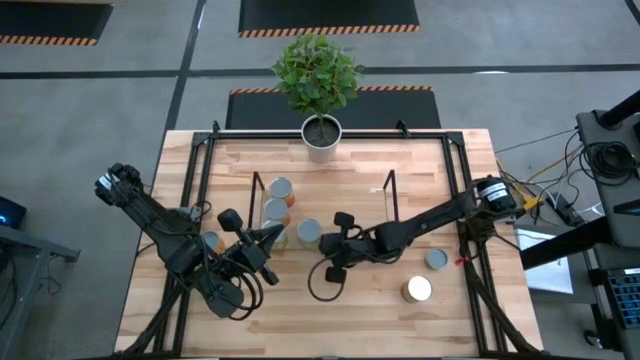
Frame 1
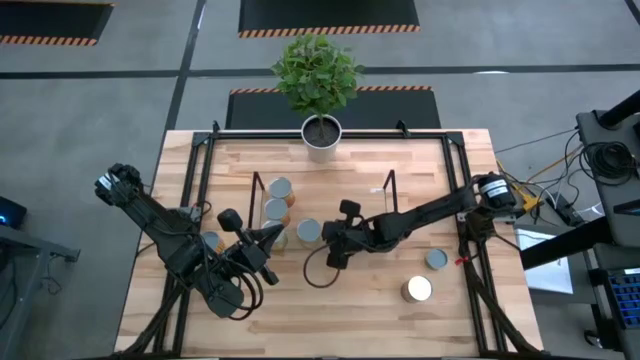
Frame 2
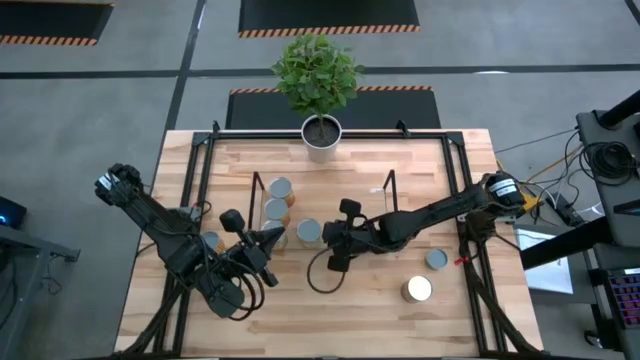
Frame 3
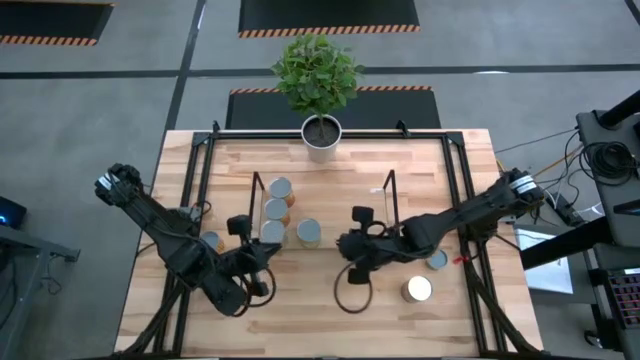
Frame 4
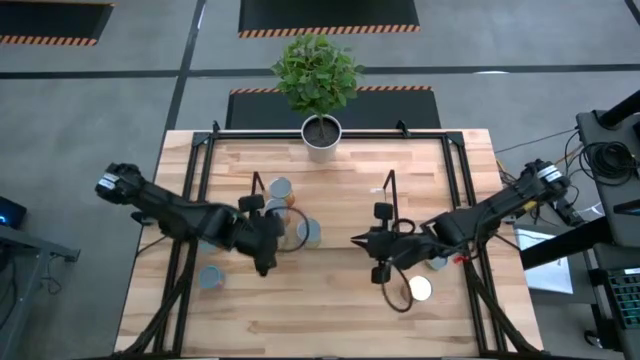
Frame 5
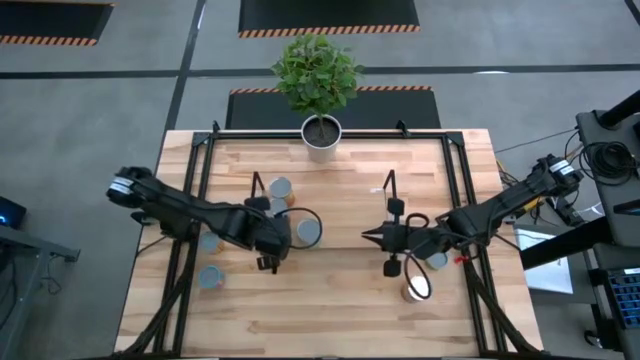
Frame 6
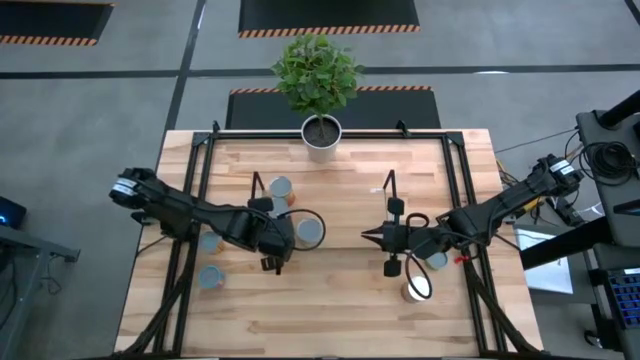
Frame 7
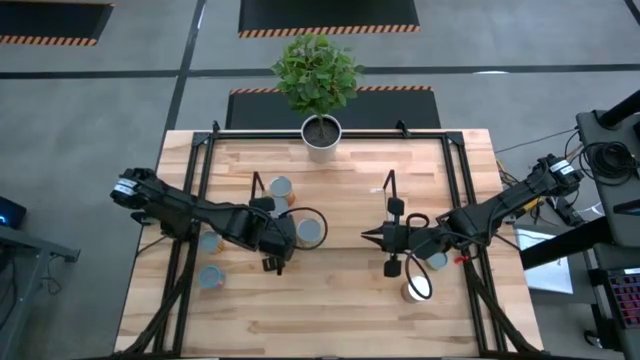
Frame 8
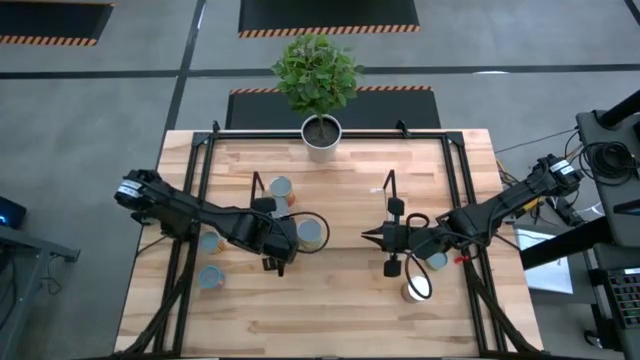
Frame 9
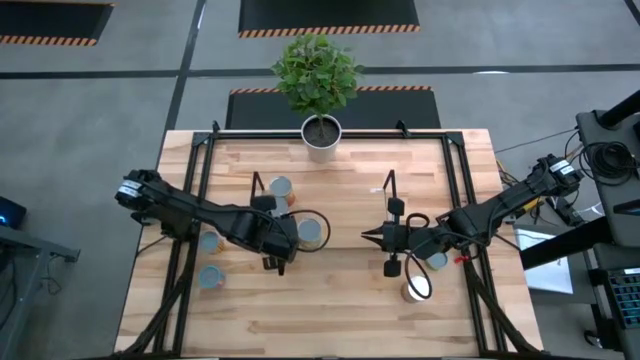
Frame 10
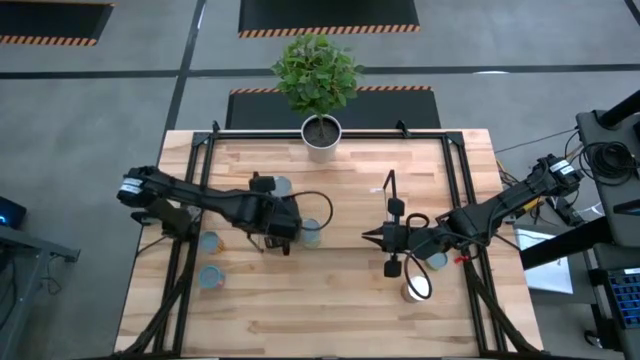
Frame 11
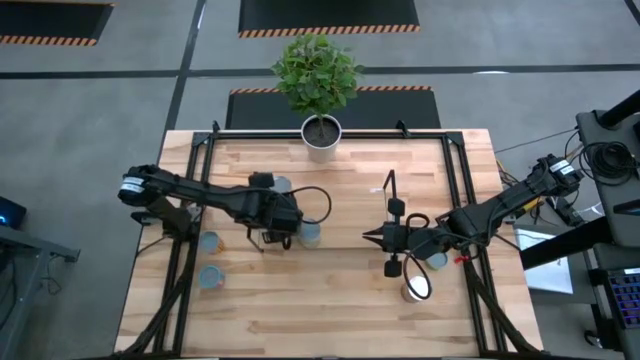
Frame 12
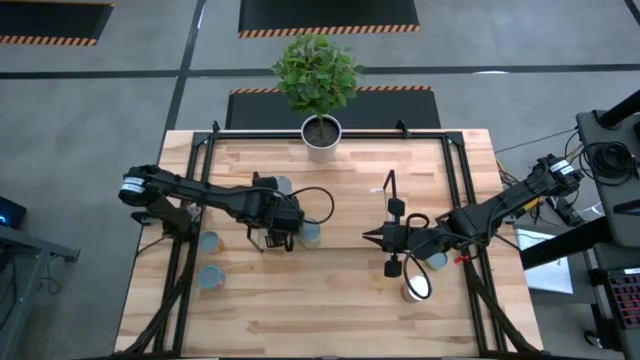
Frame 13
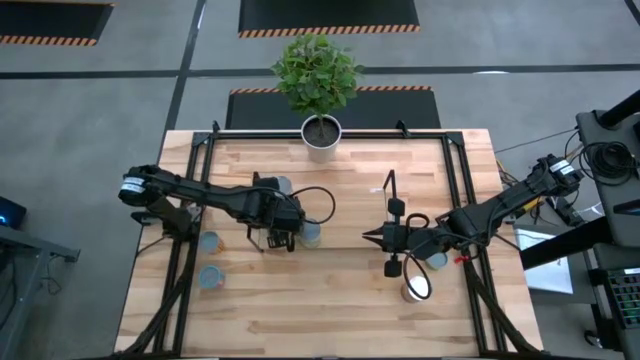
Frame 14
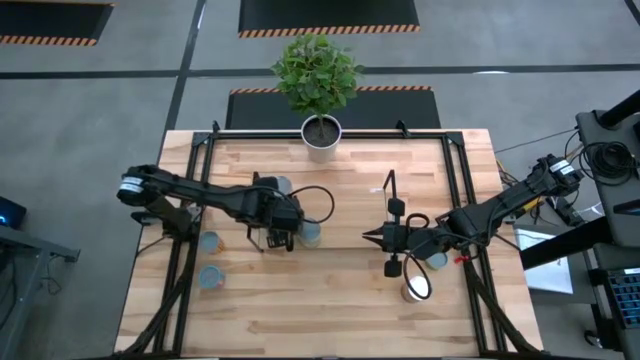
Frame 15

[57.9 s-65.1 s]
Task: Pick and place cans onto a shelf
Adjust the cans on the shelf

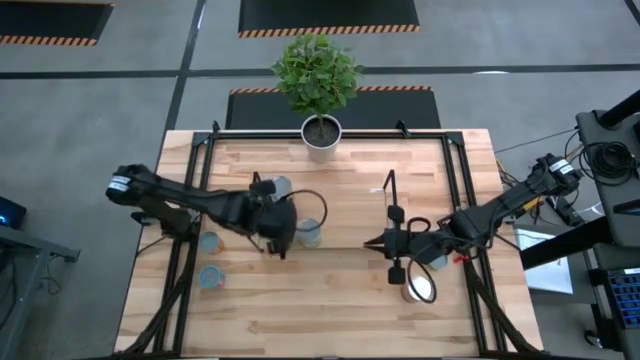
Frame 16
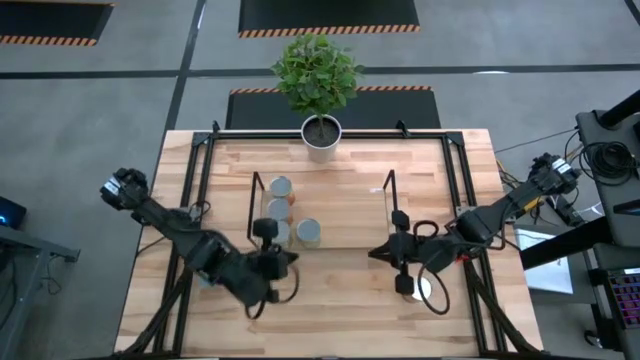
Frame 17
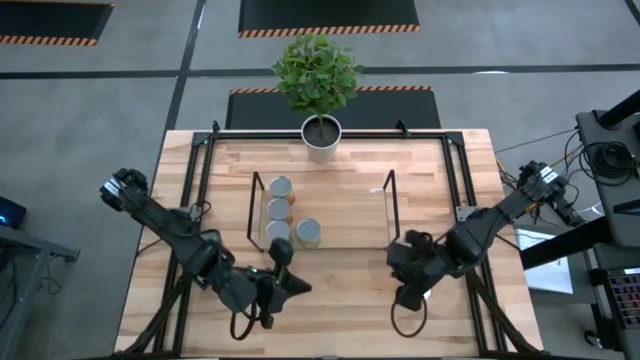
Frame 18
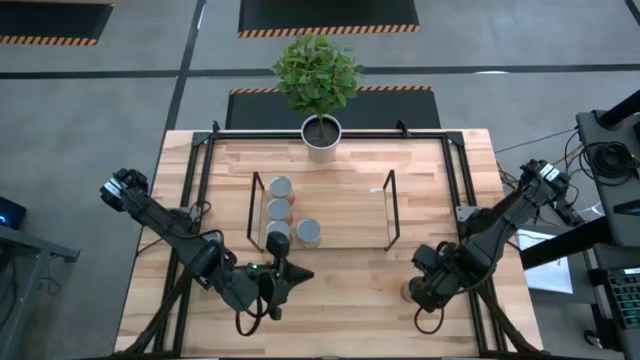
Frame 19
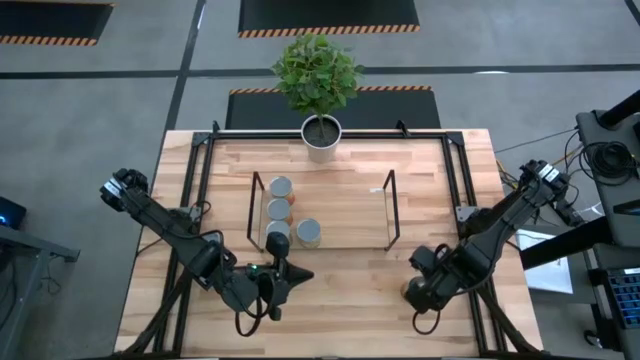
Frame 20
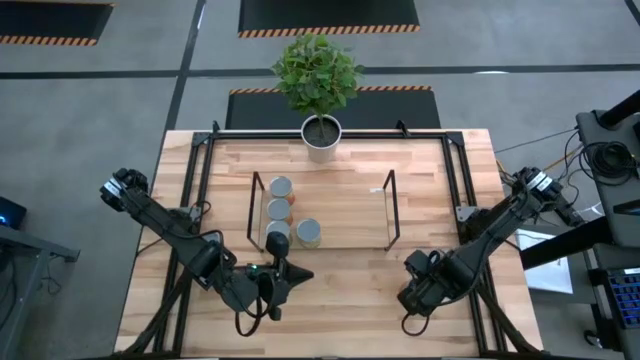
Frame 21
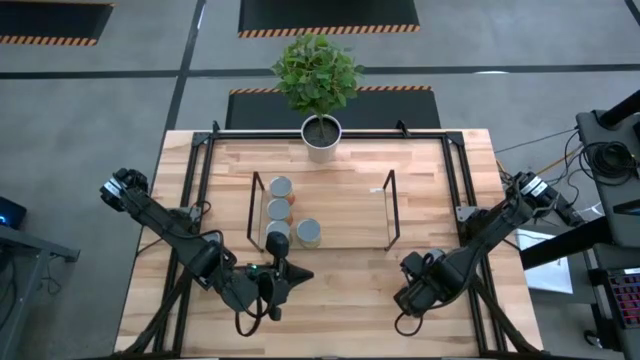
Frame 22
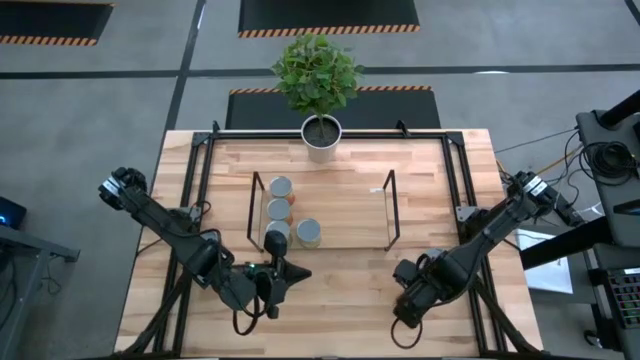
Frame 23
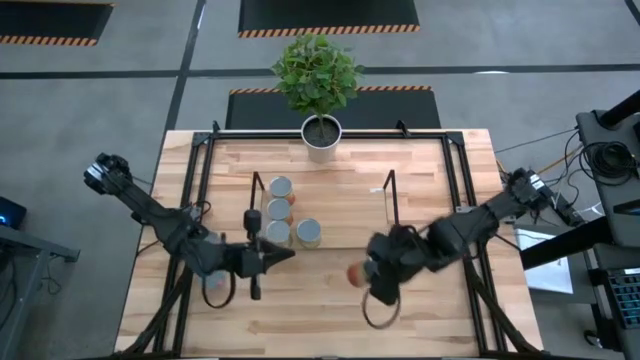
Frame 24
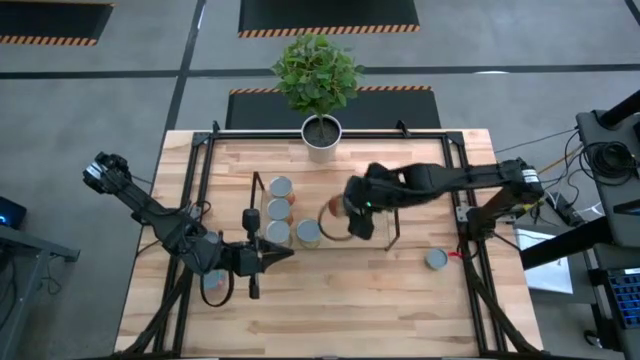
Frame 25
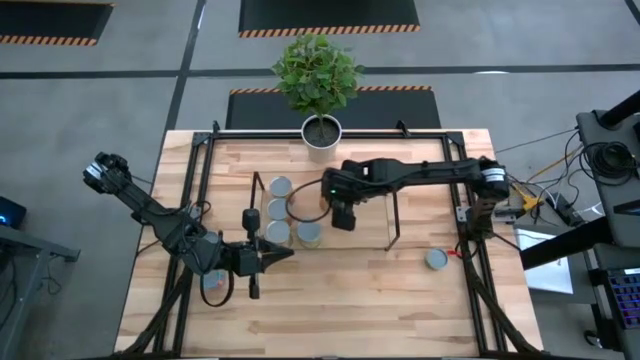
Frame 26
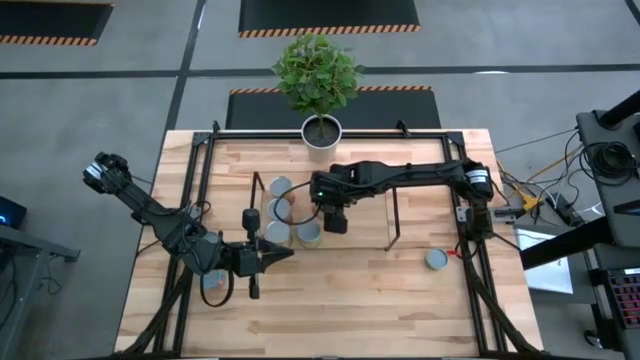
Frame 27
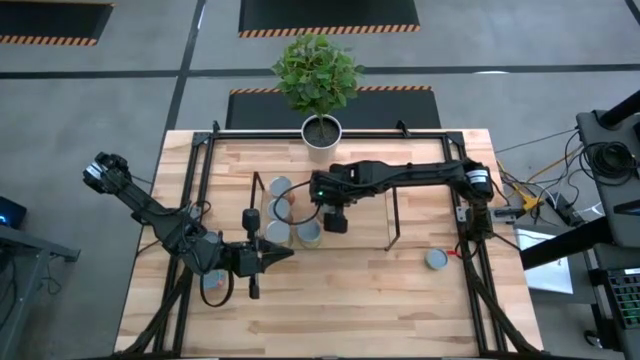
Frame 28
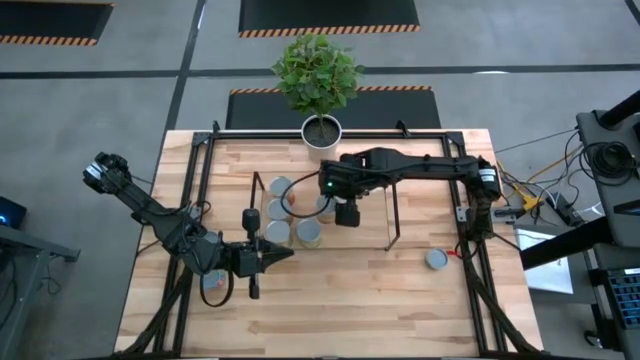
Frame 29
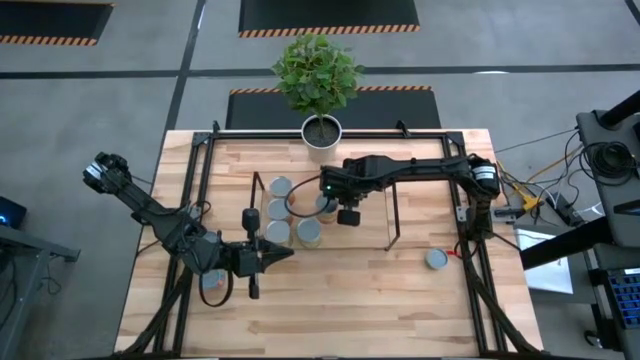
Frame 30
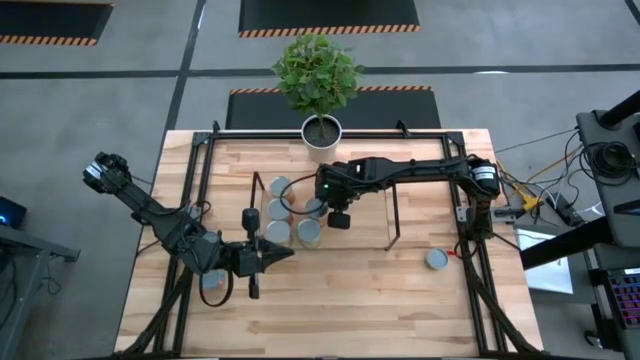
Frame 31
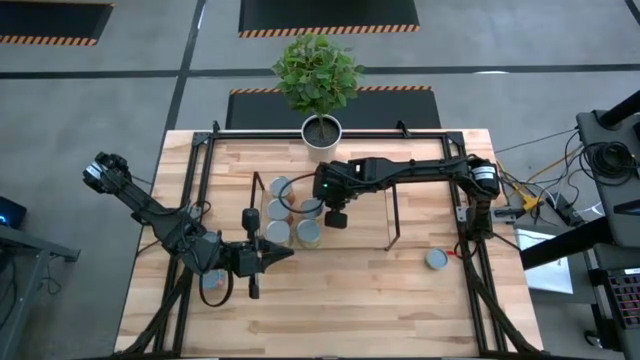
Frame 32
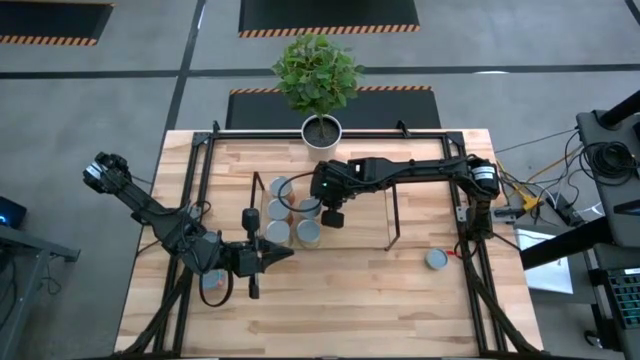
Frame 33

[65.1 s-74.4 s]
Put the canned corn on the shelf

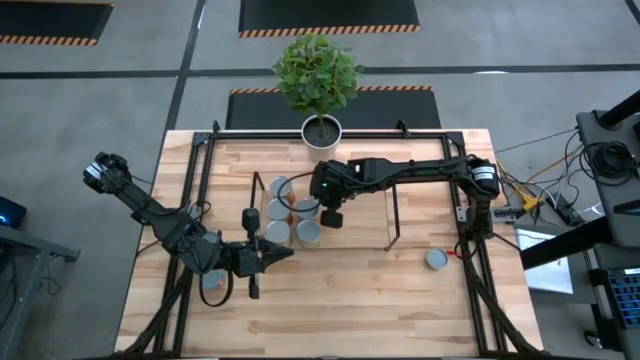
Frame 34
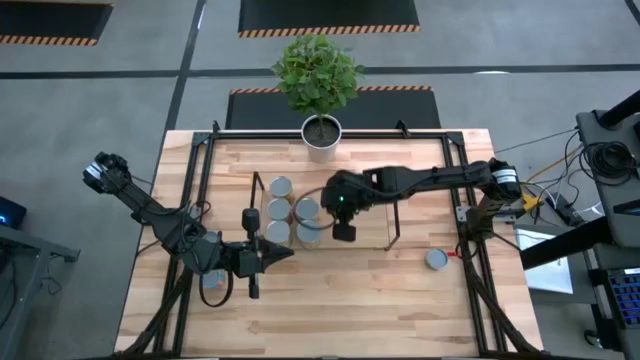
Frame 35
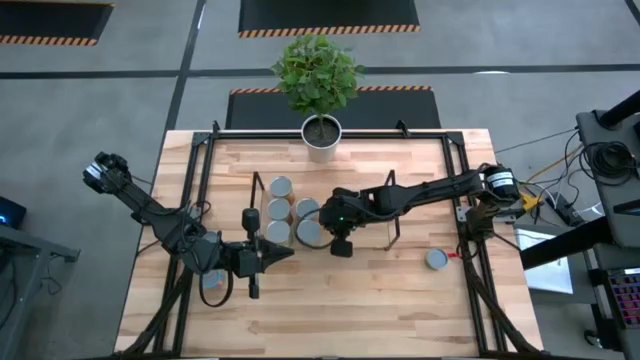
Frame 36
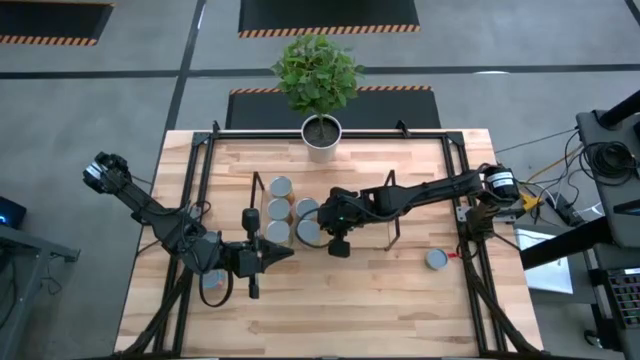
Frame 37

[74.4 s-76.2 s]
Adjust the canned pears on the shelf

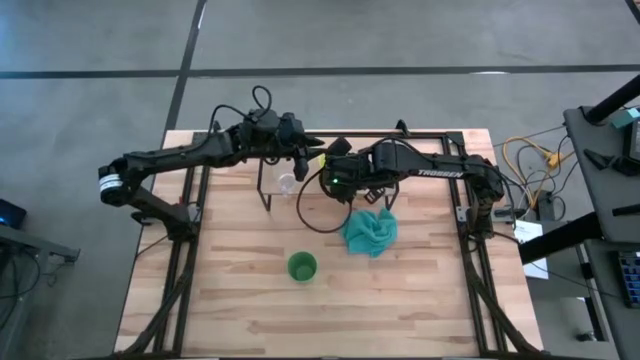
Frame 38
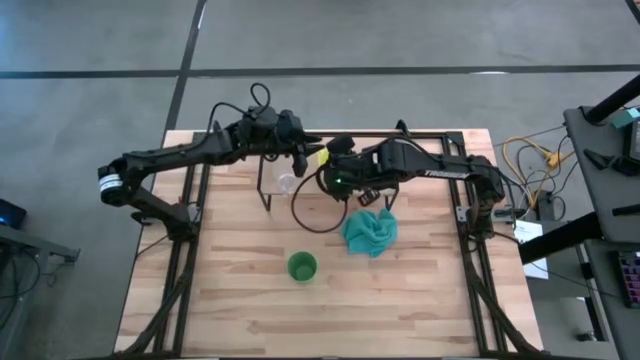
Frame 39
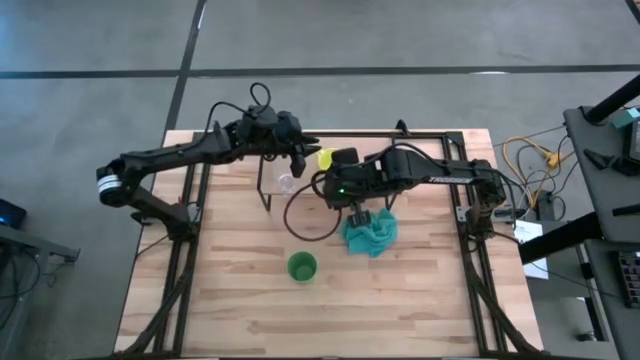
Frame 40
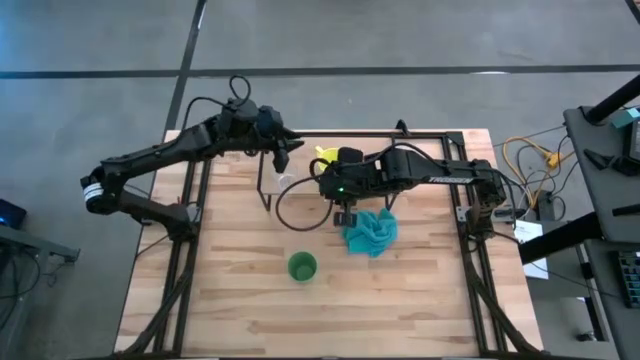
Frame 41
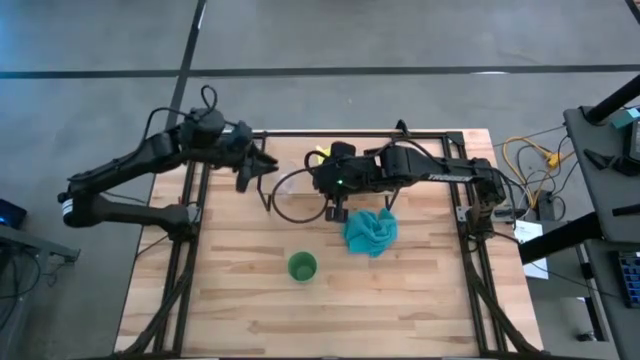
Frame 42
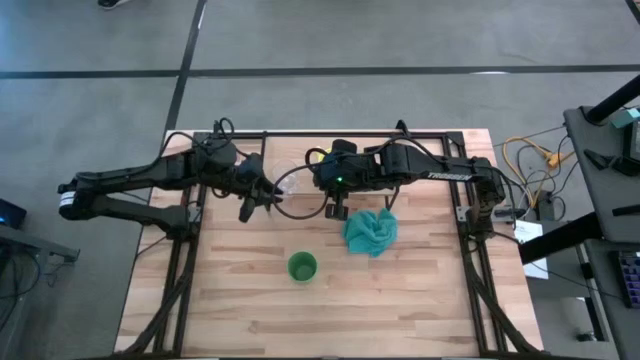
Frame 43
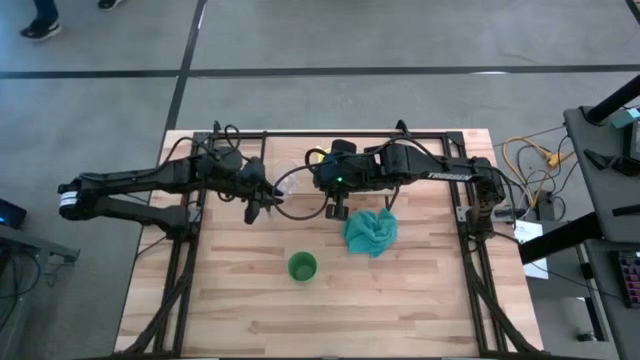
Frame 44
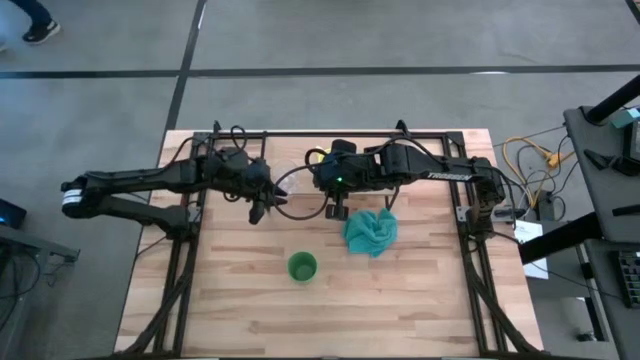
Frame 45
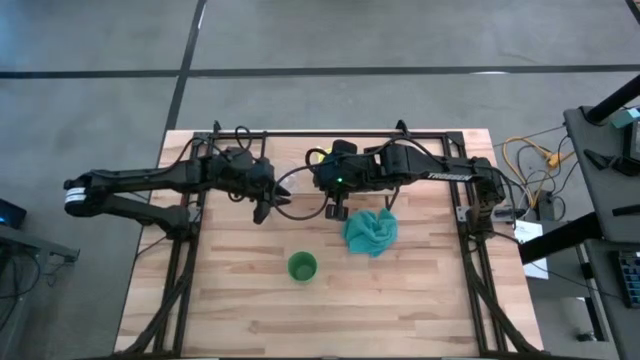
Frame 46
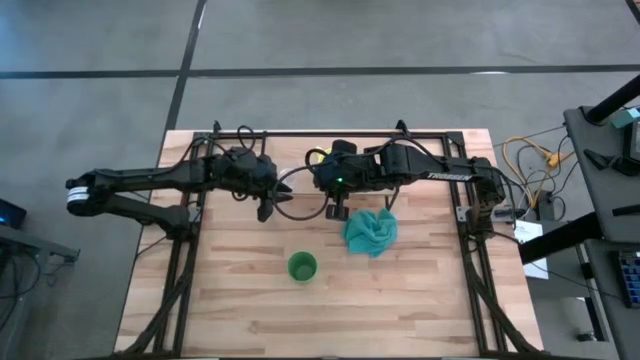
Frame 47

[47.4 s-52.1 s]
Task: Stack small to large cups/mugs on shelf
Adjust the transparent cup on the shelf
